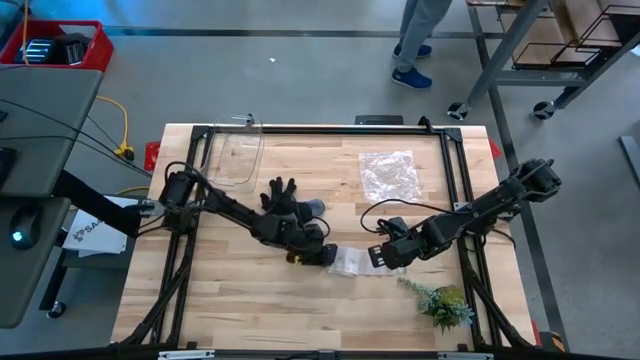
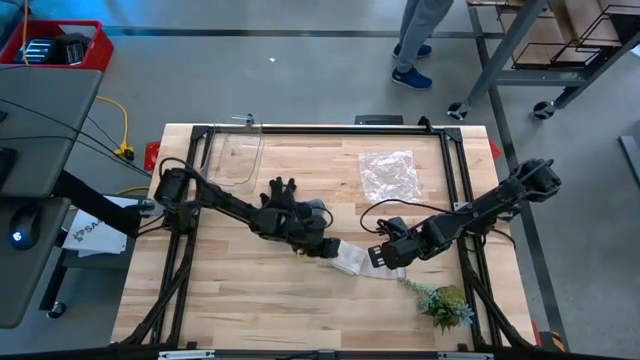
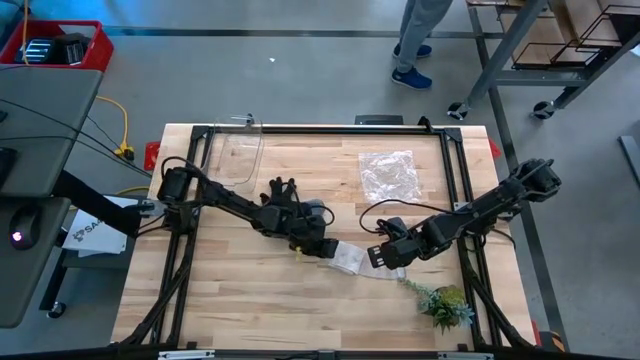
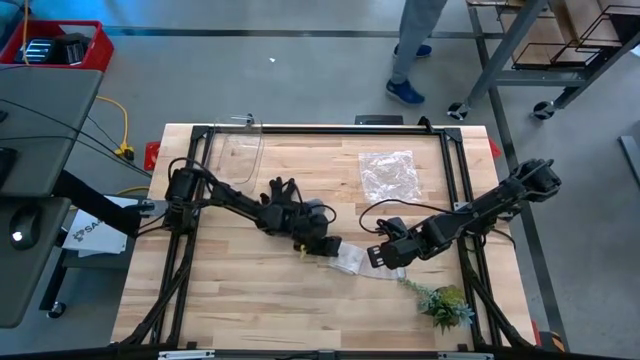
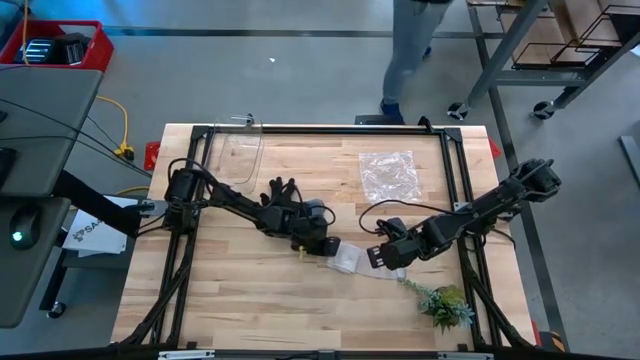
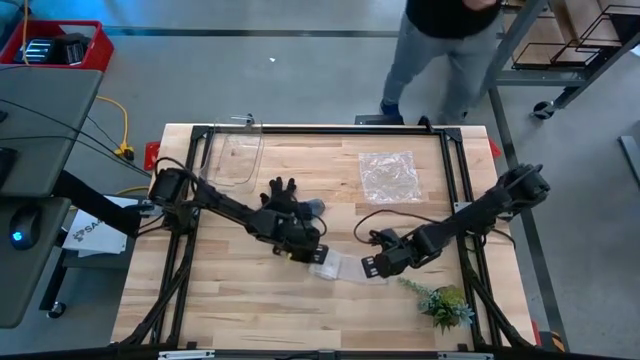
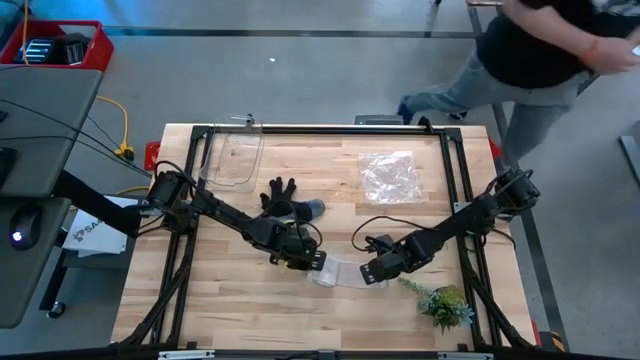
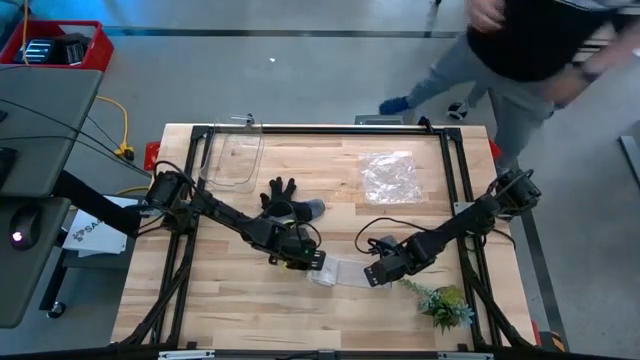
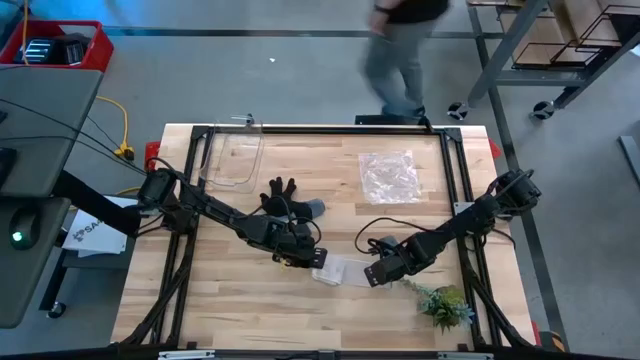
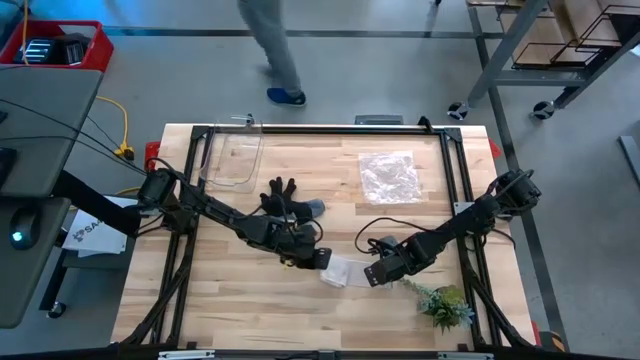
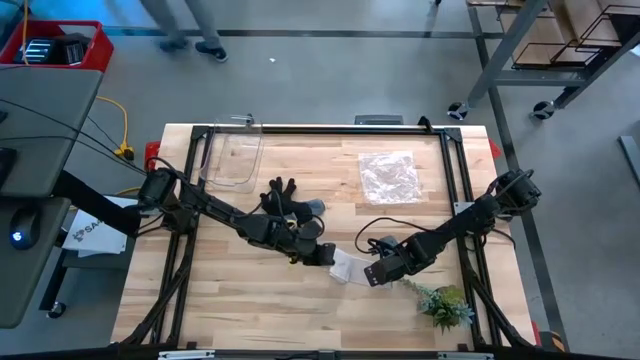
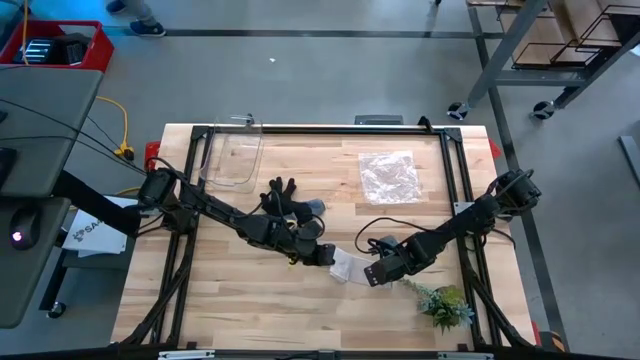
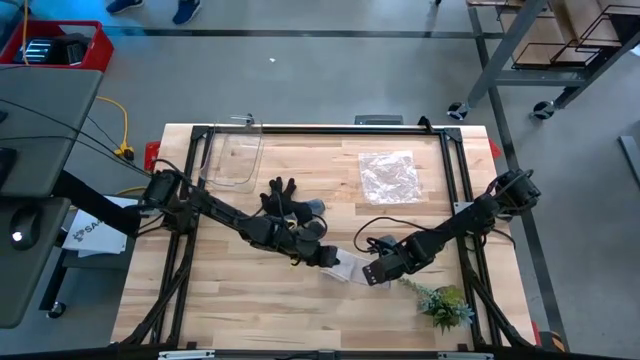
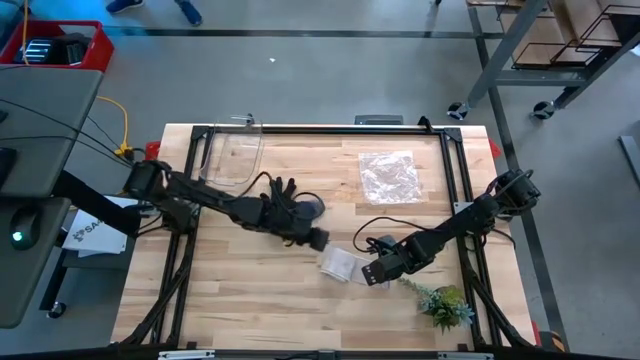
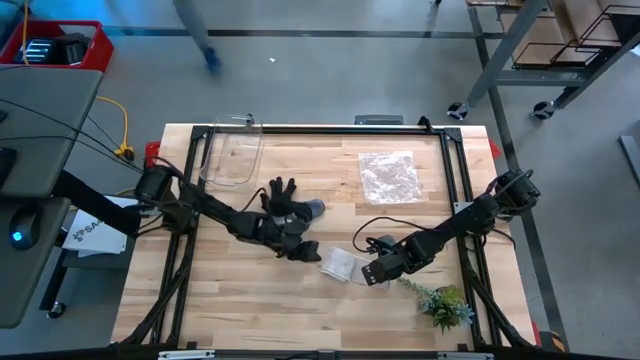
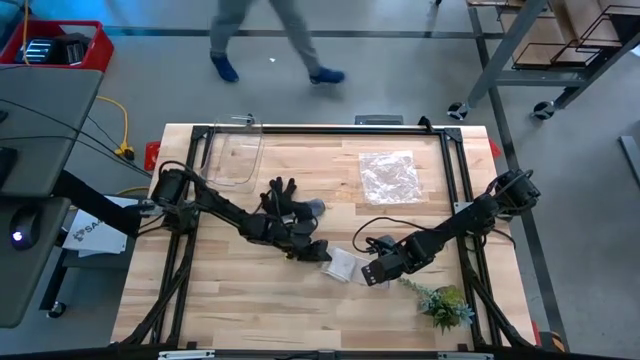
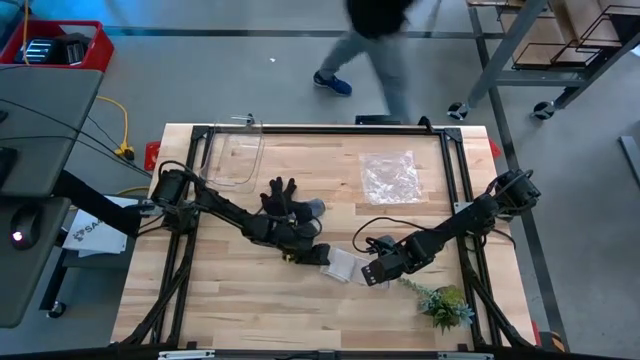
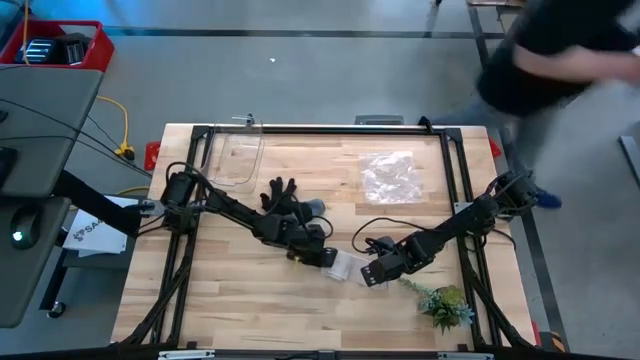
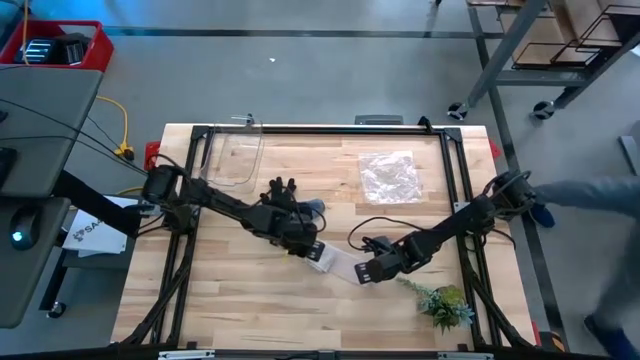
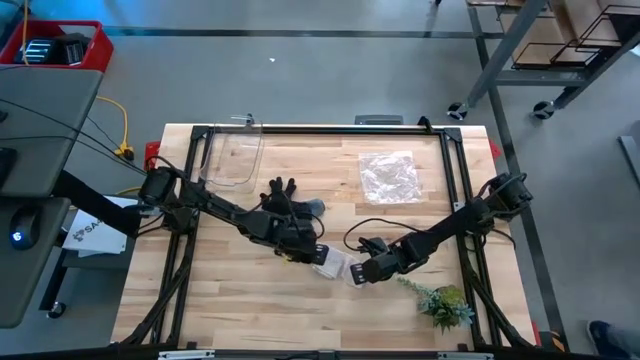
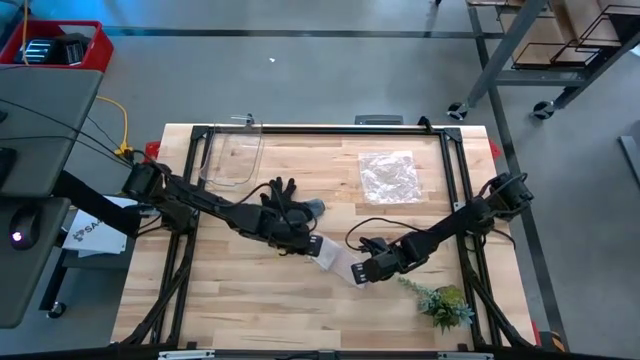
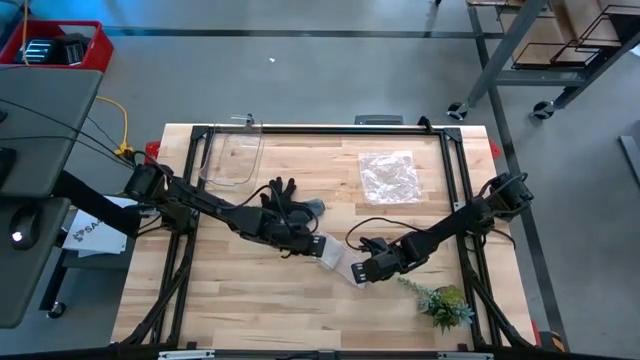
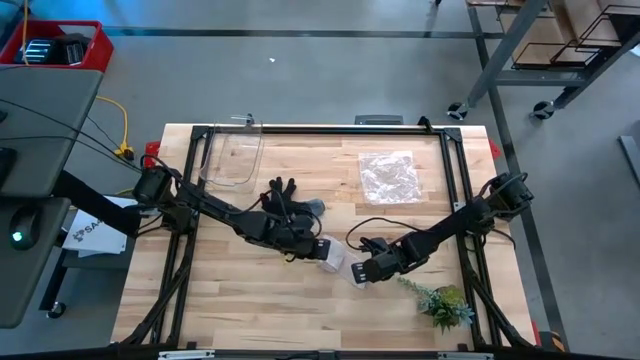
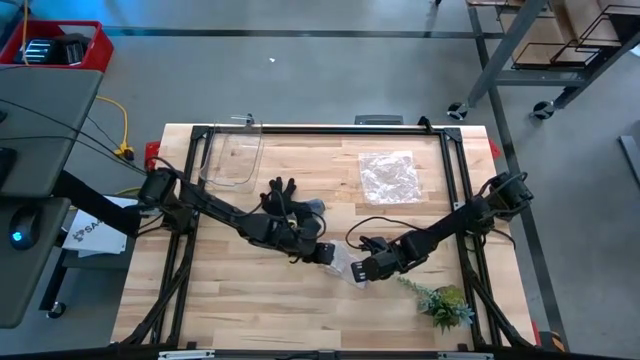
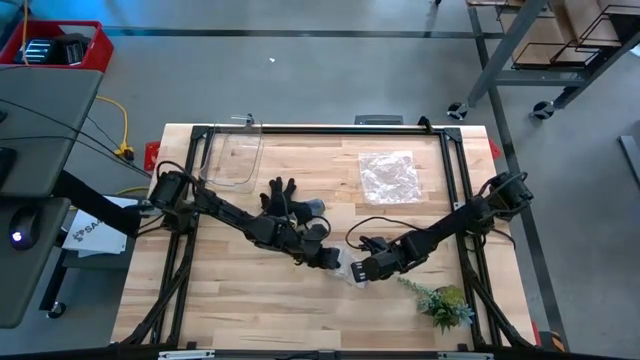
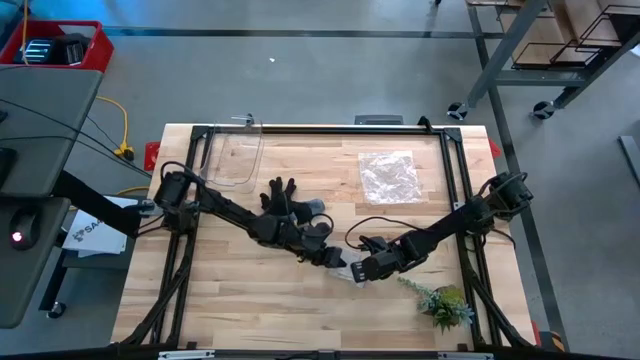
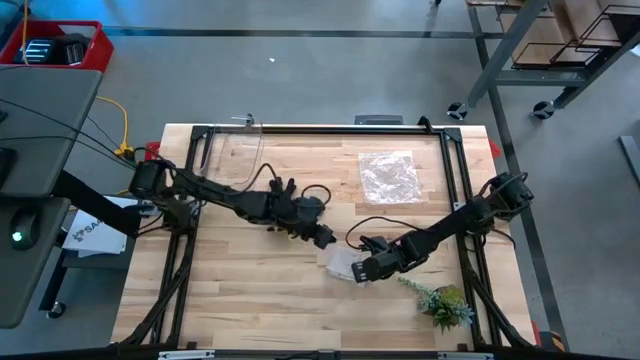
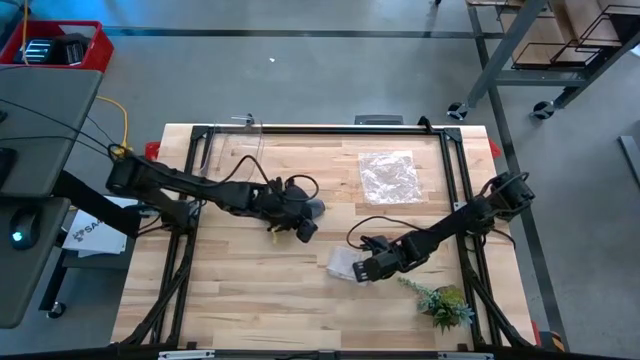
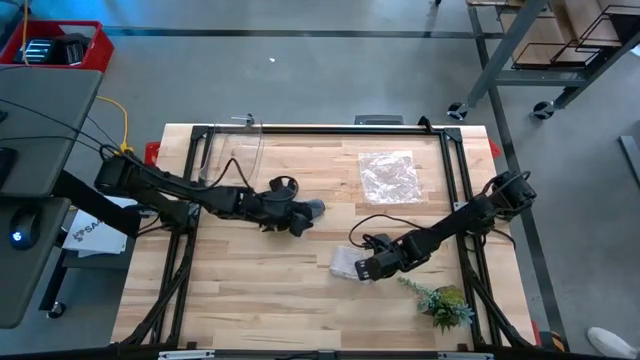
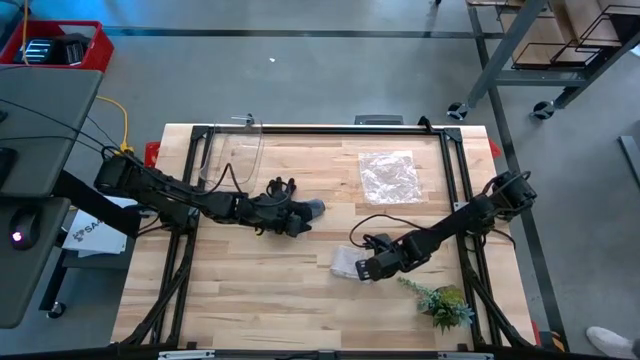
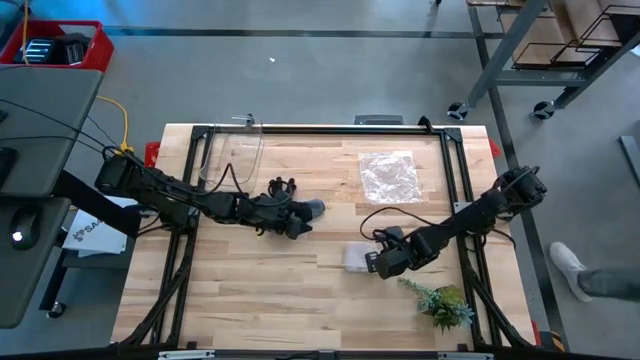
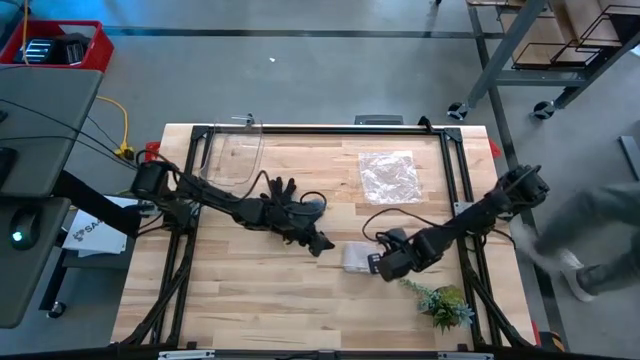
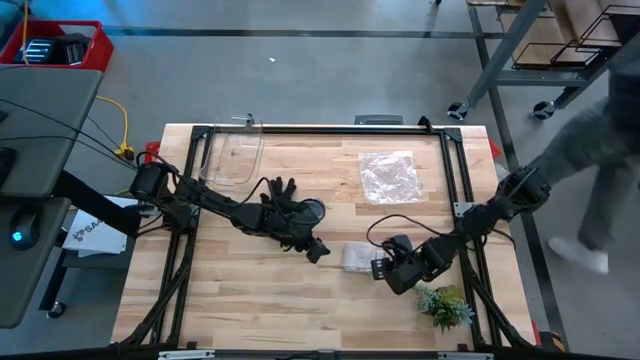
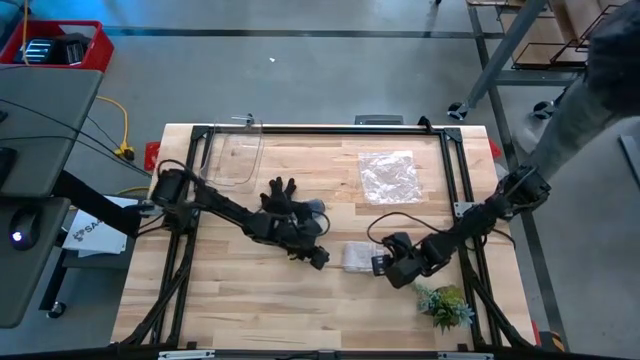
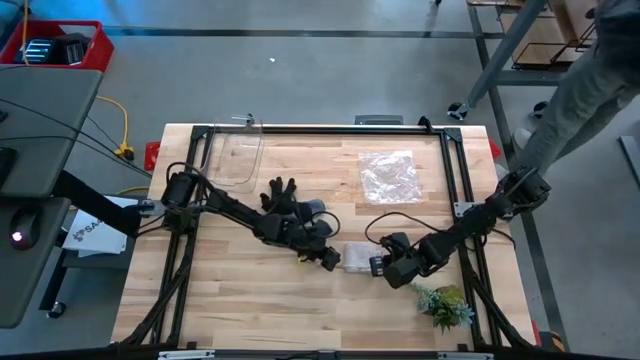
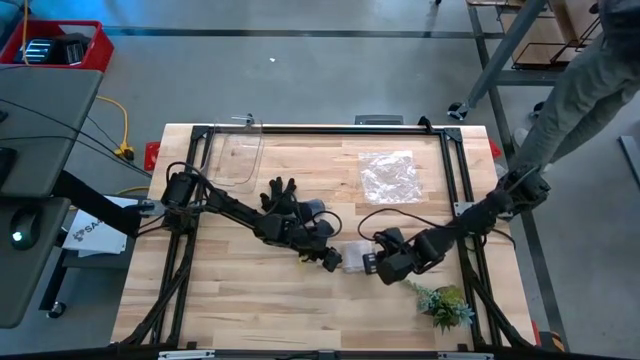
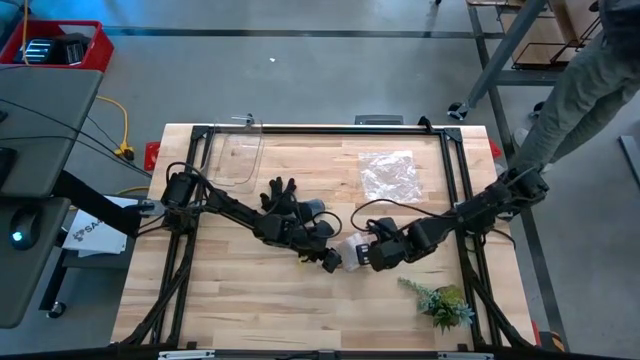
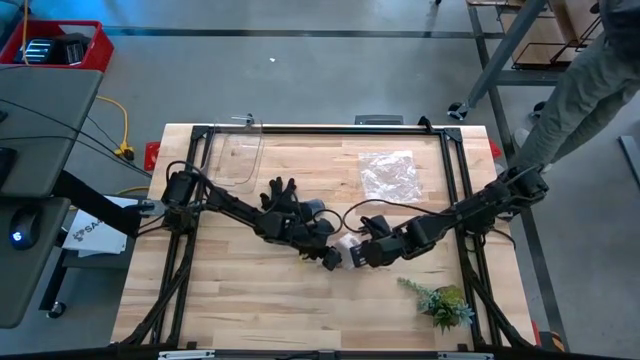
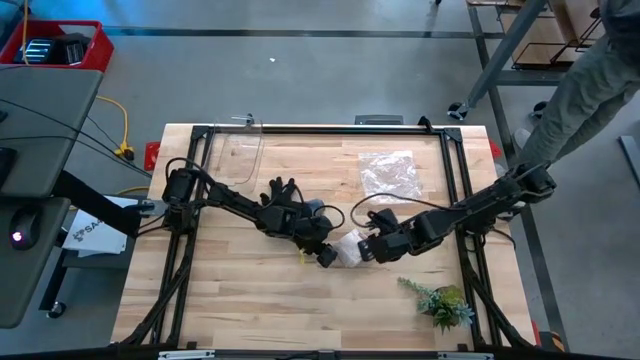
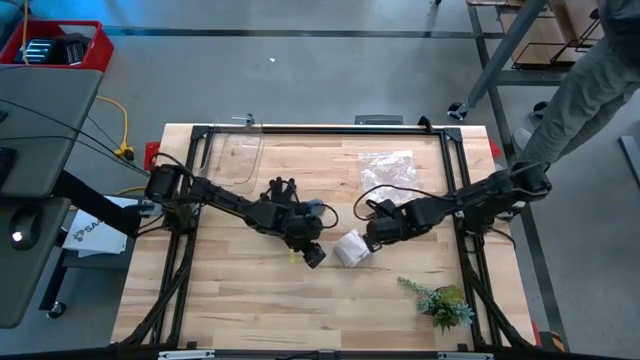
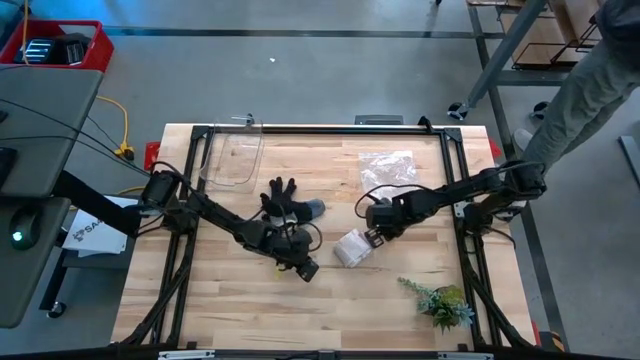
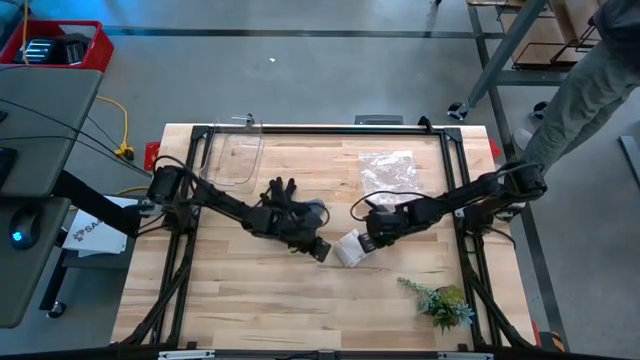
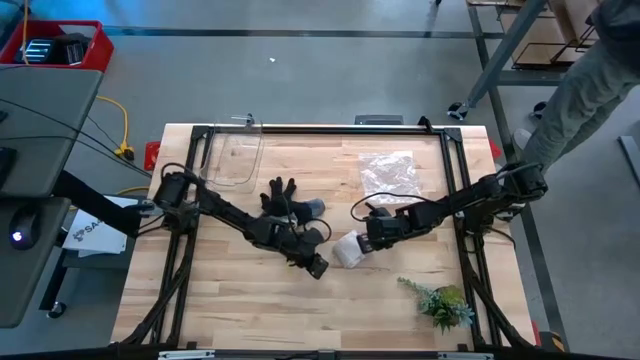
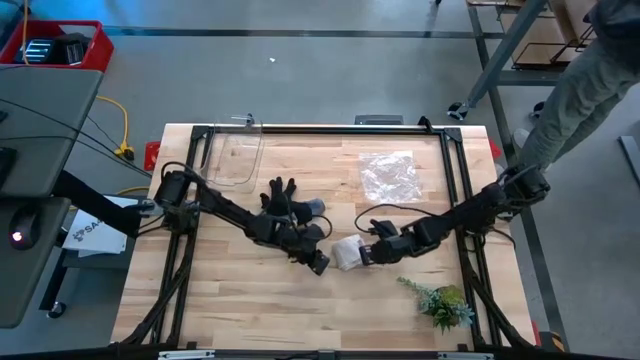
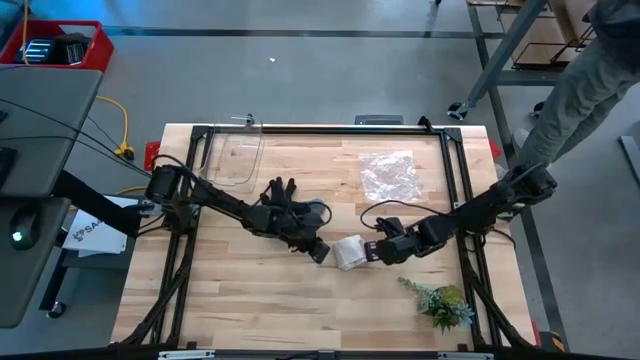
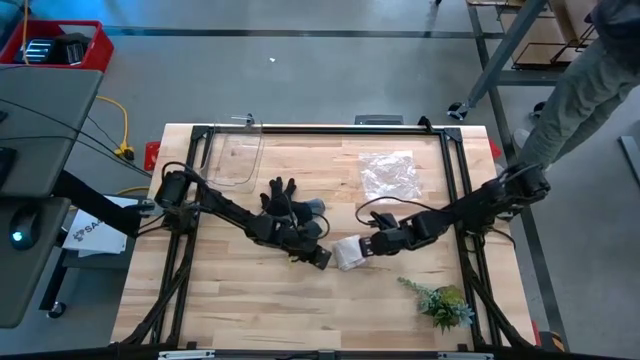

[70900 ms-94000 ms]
Task: Roll bandage
Roll the white-brown bandage
